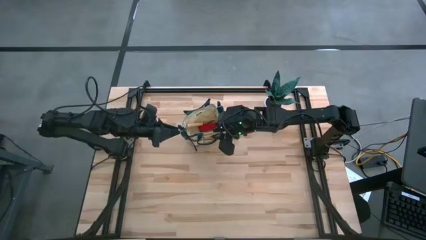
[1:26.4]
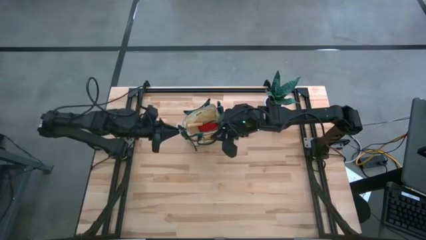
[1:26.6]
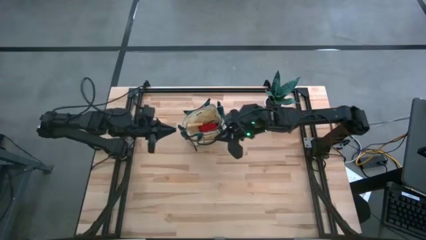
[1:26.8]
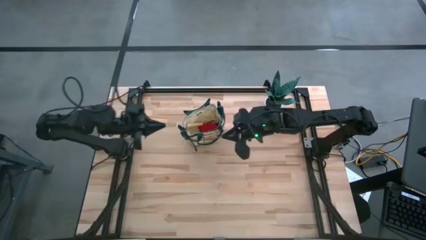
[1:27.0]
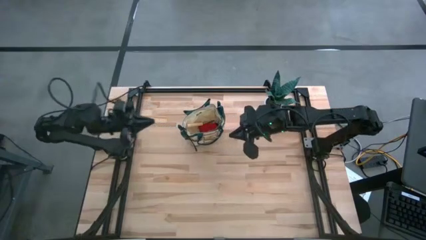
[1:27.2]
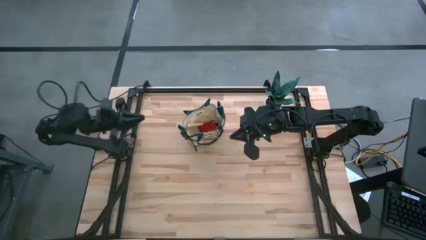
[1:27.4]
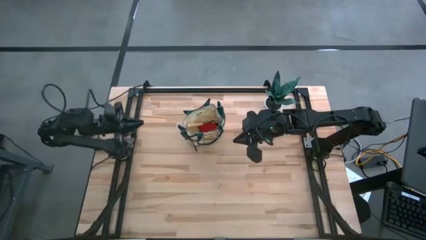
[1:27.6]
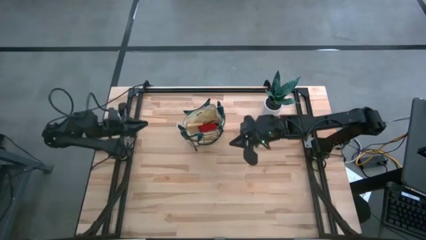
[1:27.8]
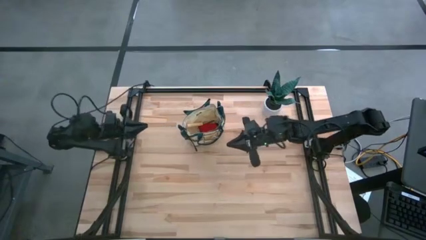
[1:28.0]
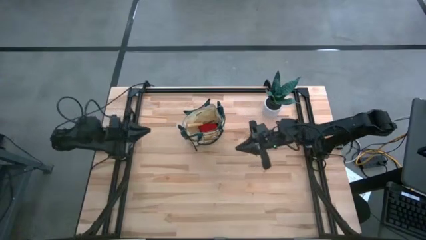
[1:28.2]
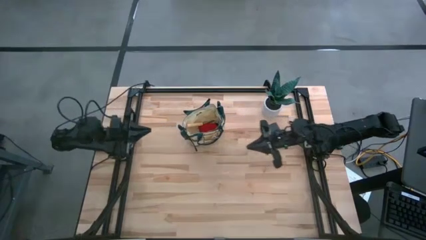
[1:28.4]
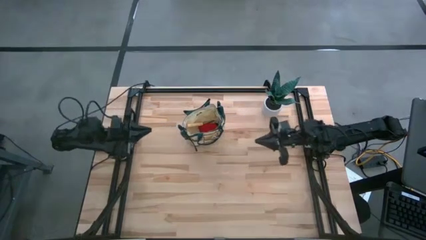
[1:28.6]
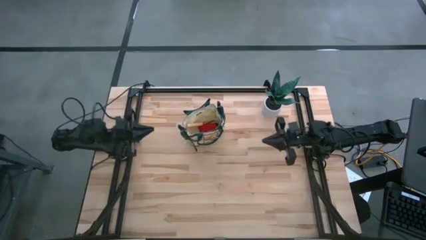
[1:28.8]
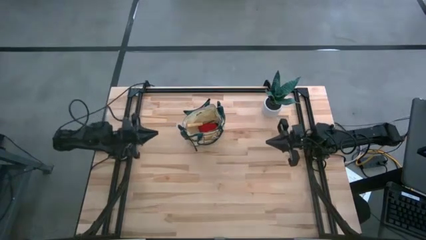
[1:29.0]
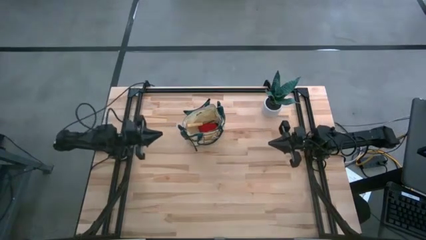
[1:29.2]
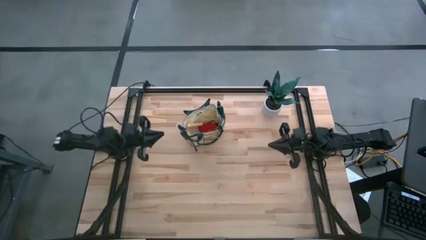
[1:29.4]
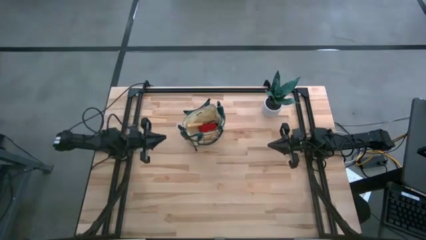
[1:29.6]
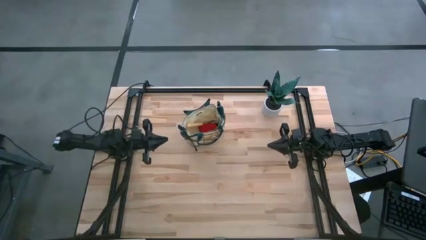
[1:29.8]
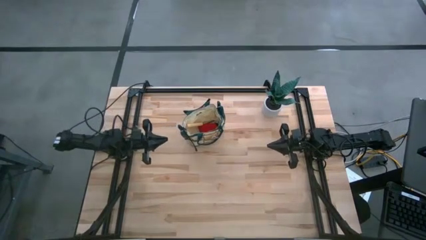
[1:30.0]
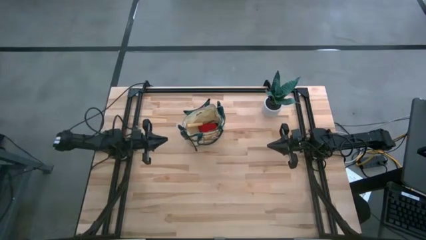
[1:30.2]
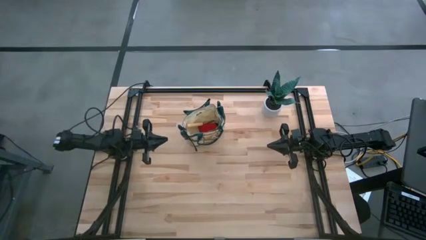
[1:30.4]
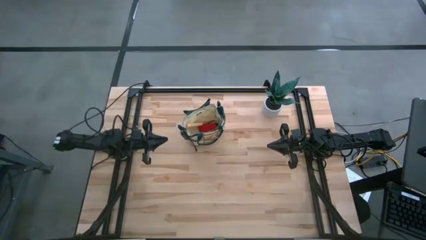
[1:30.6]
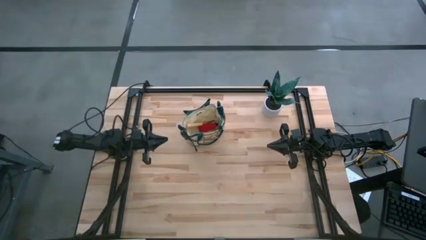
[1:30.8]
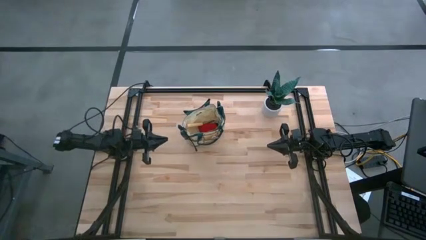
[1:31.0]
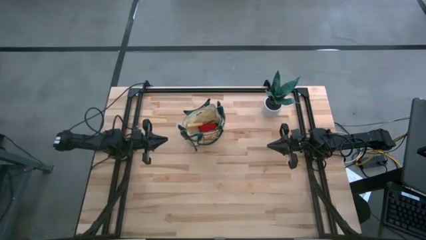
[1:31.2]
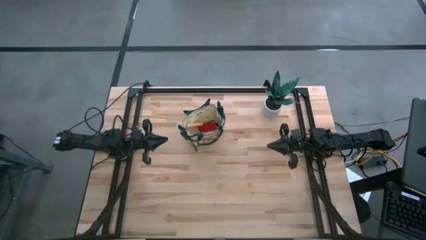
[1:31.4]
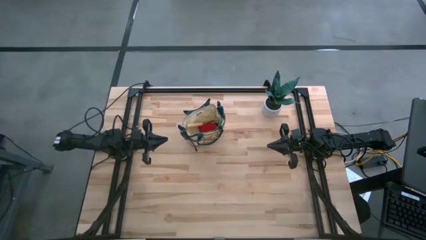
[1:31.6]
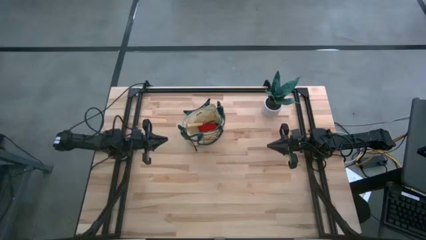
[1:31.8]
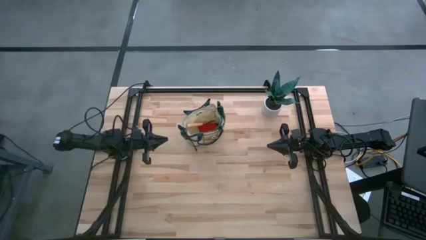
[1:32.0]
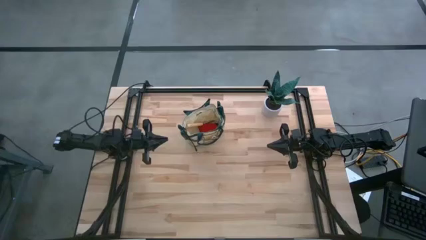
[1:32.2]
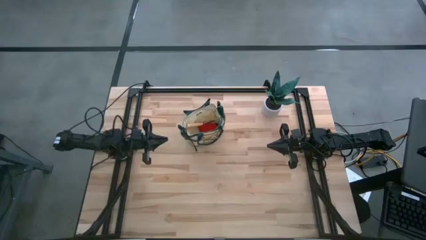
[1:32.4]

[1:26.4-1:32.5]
Task: Pick & Place Garden tools in Gardening bag
Return to Home Position

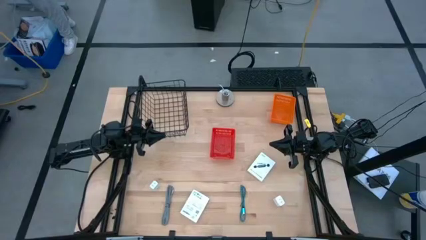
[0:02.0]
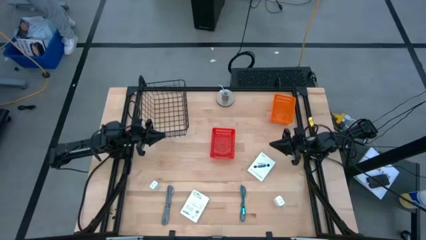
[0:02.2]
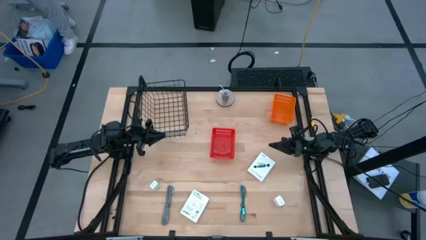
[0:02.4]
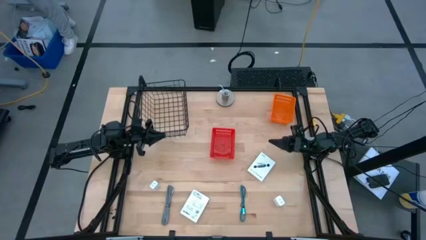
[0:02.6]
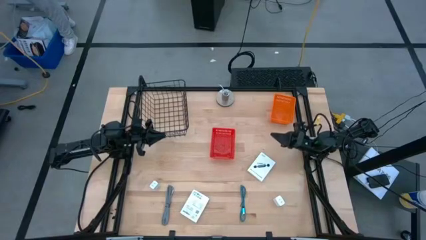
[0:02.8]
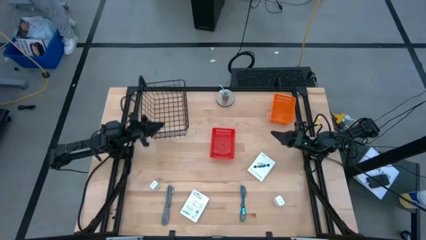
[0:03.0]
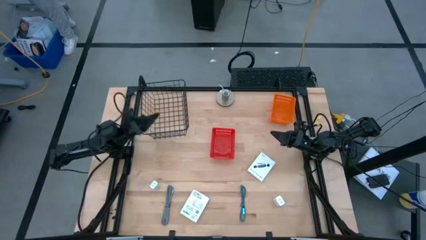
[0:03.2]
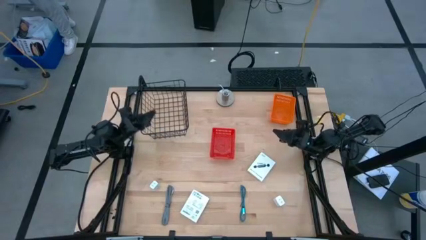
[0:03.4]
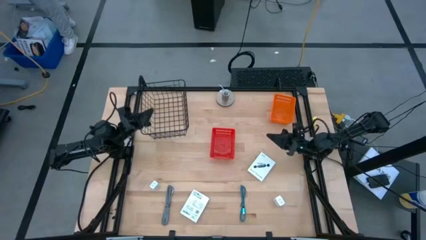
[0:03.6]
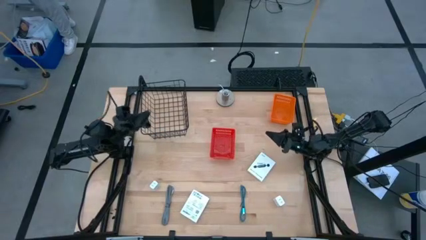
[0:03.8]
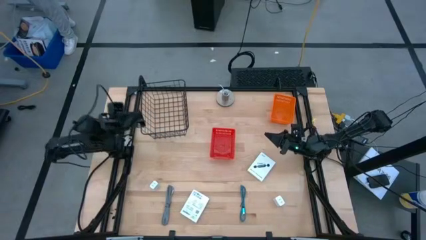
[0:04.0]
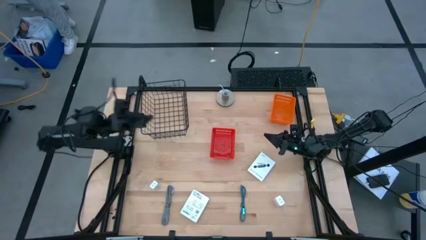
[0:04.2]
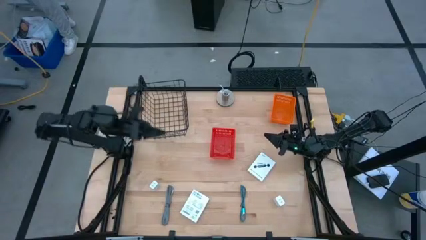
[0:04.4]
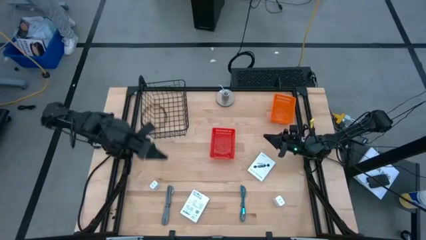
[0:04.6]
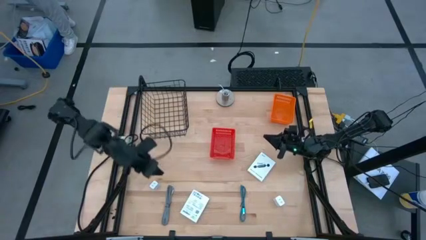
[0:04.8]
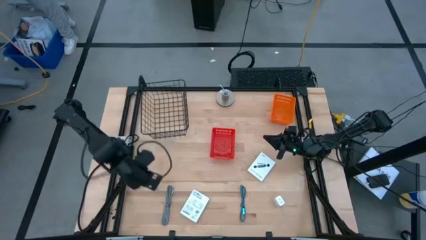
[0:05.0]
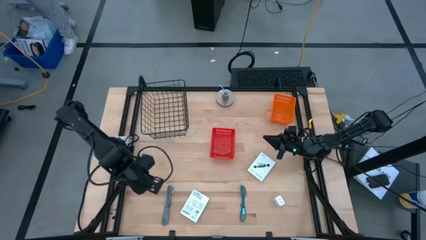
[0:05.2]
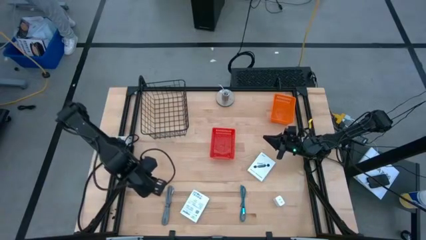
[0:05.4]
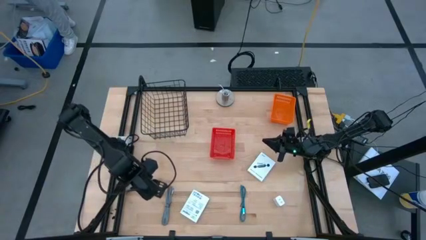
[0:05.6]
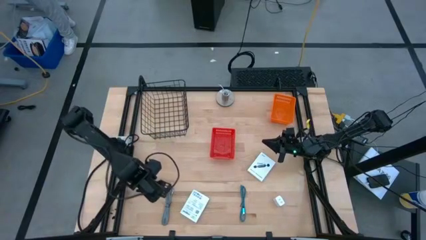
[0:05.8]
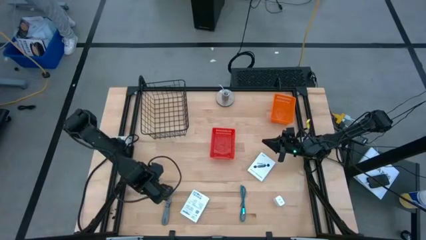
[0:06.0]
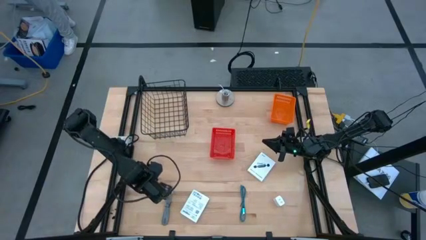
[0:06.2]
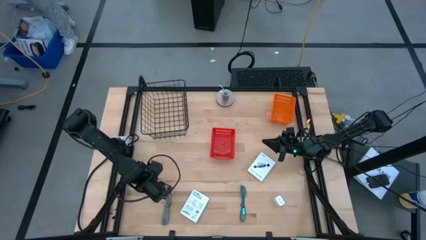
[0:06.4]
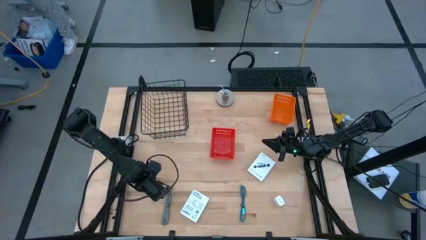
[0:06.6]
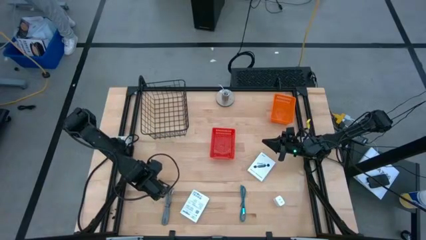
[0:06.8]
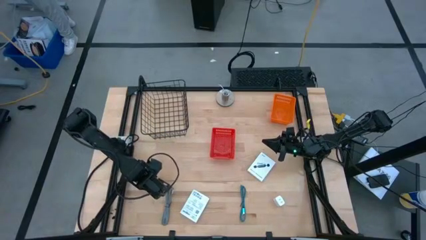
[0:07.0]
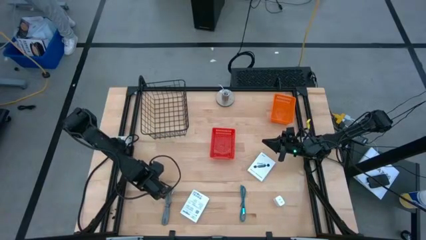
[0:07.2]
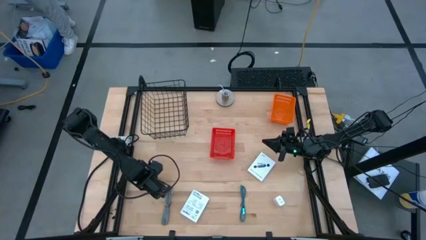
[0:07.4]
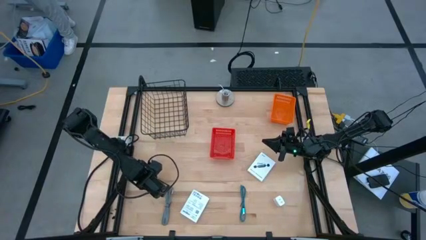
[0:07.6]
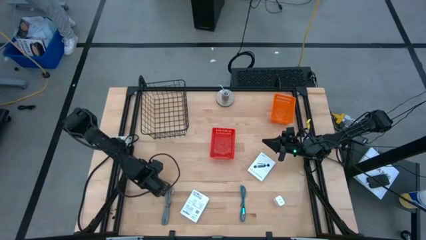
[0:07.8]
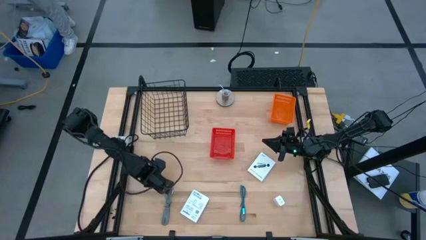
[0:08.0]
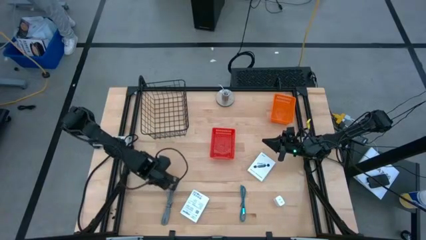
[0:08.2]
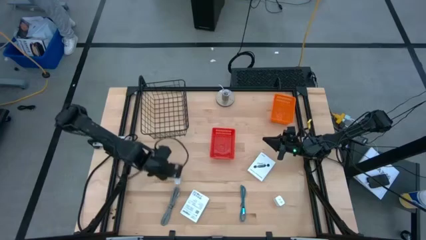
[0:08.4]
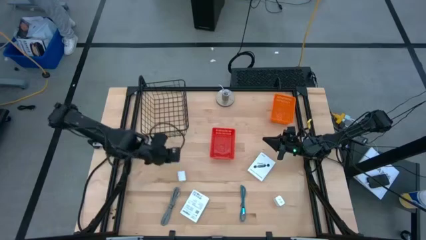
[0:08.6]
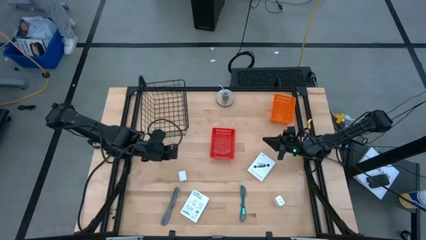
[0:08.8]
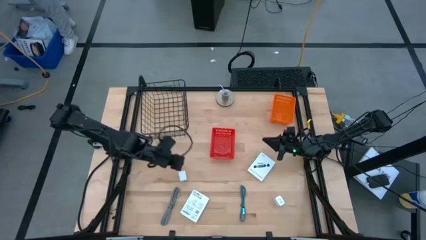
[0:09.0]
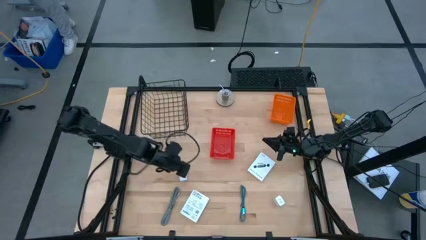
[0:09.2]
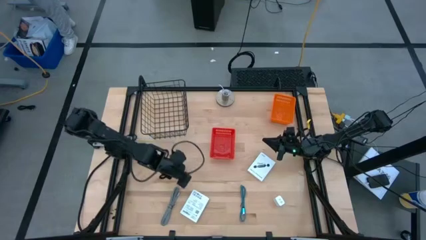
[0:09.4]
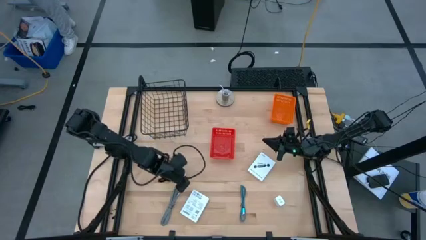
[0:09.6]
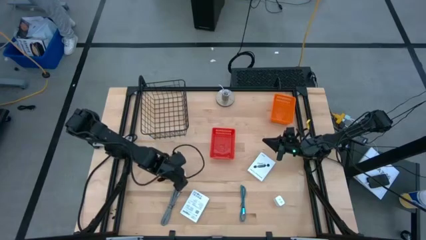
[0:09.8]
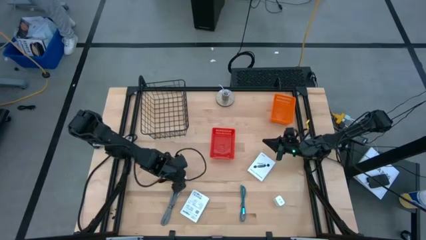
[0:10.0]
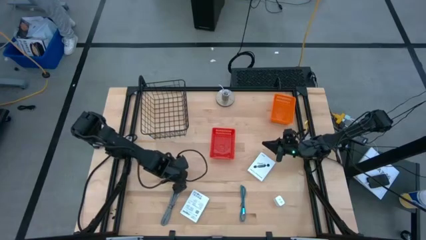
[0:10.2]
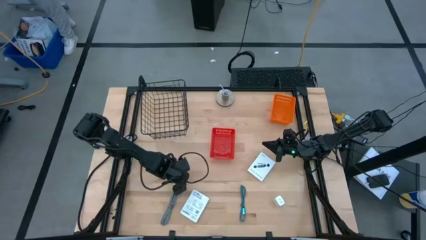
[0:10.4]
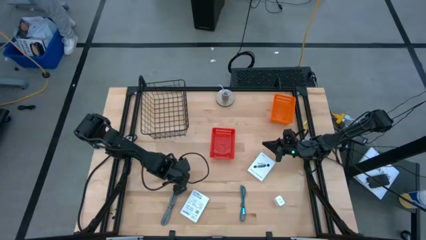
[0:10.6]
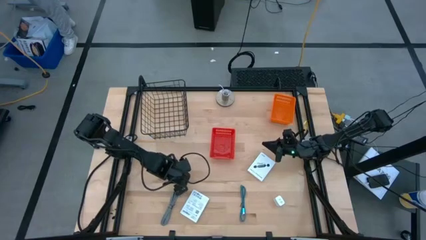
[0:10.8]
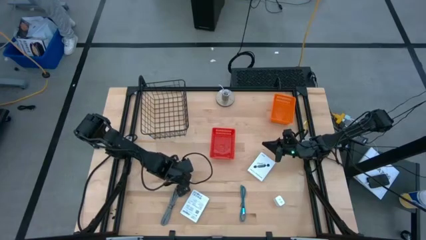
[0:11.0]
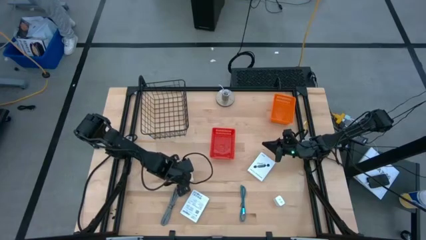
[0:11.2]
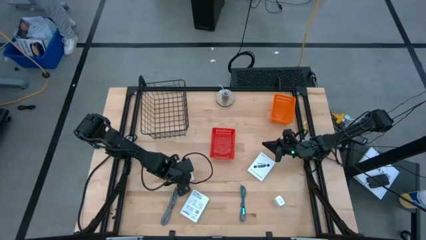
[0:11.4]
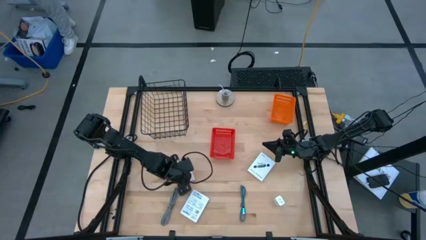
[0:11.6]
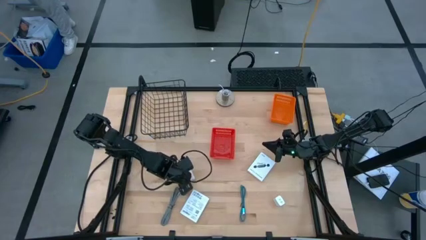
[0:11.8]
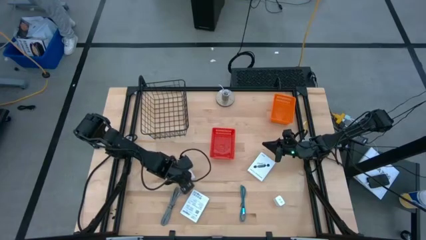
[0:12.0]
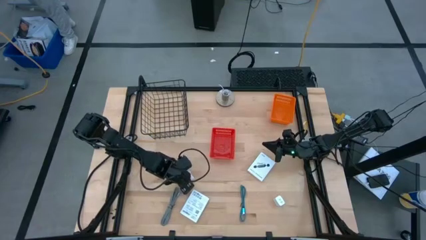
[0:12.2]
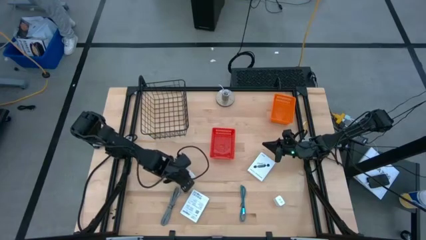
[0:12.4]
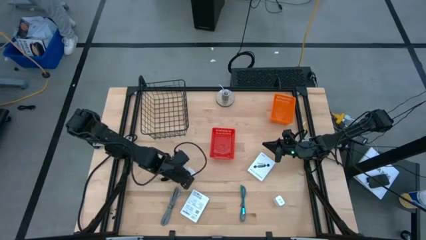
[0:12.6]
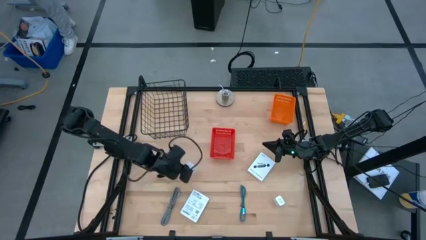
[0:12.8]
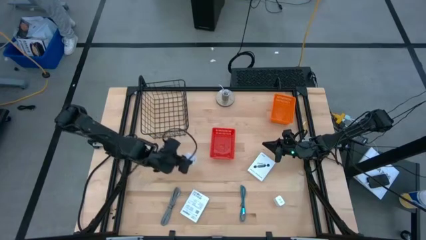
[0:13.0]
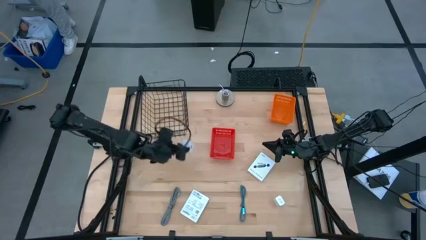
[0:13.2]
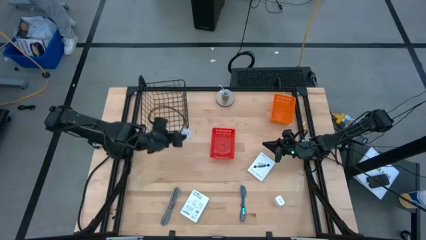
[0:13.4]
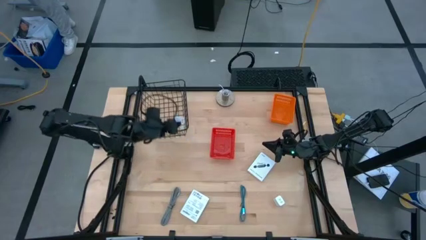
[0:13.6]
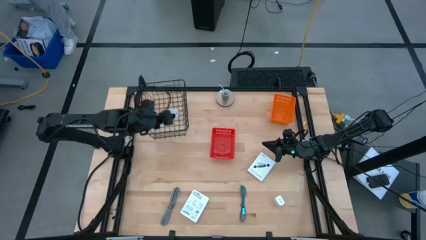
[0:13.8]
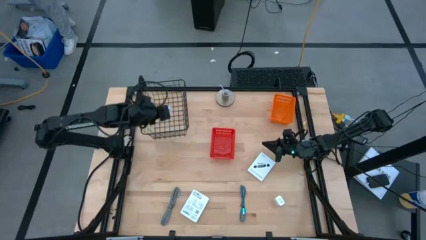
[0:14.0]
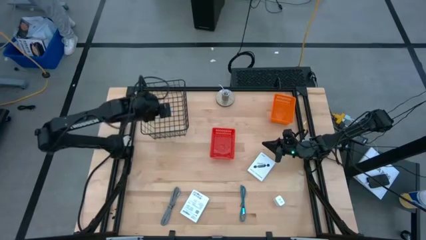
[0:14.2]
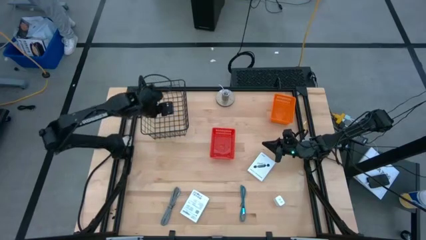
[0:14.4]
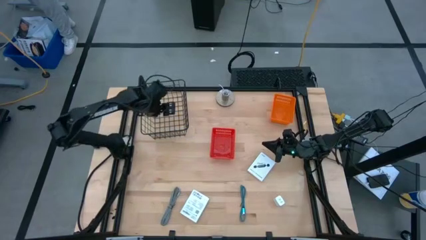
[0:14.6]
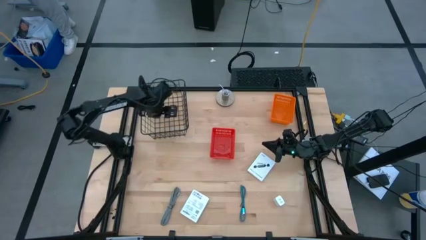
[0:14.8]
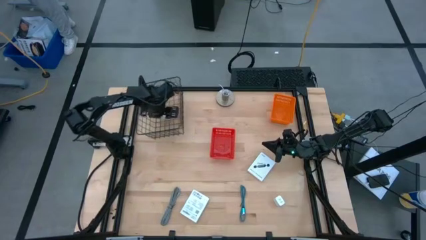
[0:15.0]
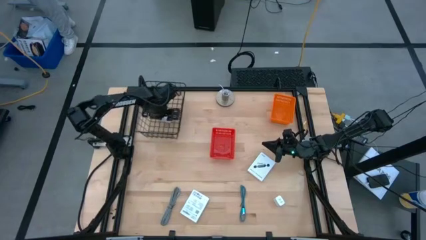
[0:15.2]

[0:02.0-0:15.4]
Task: Pick and place items into bin
Put the left white charger adapter into the red bin
